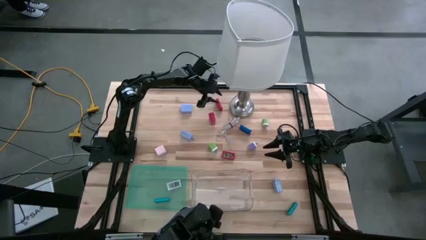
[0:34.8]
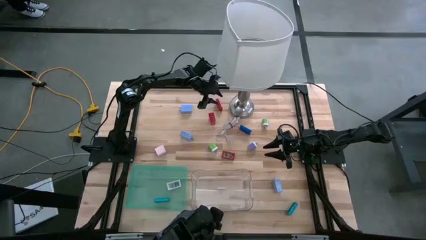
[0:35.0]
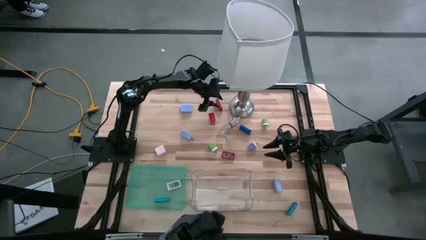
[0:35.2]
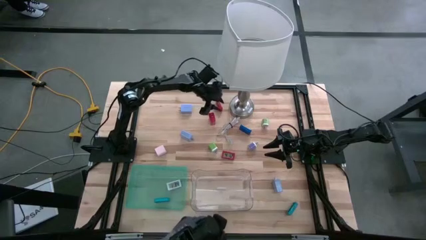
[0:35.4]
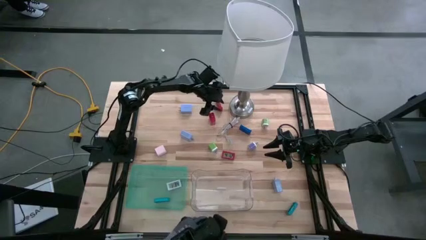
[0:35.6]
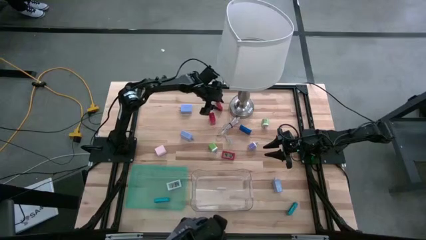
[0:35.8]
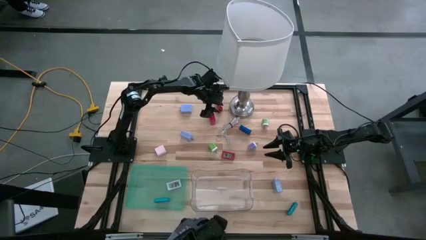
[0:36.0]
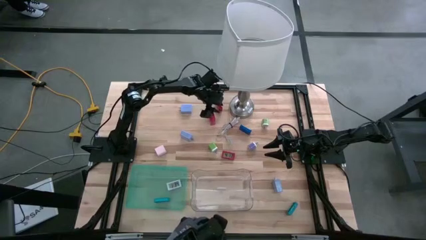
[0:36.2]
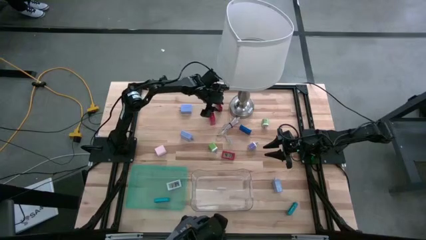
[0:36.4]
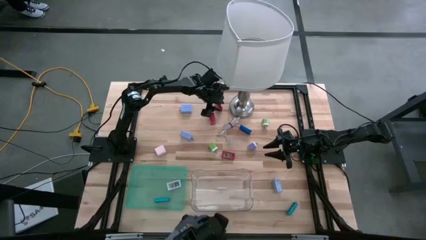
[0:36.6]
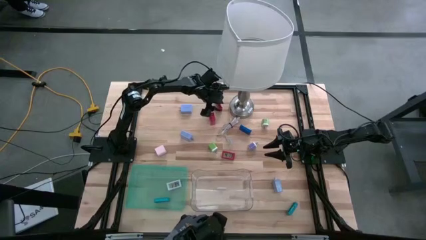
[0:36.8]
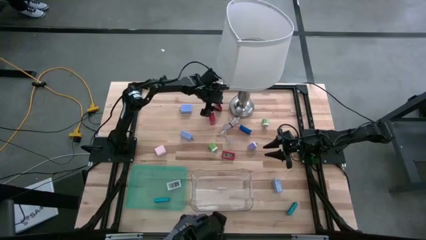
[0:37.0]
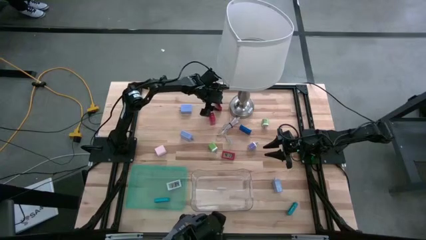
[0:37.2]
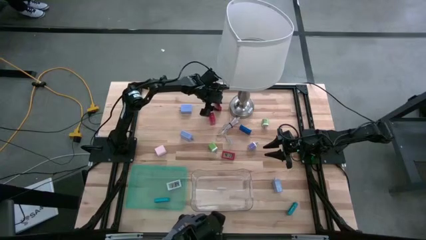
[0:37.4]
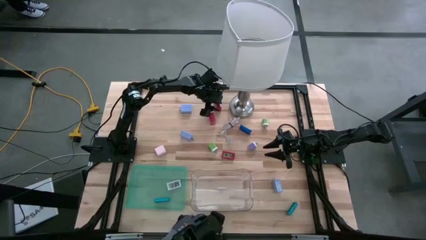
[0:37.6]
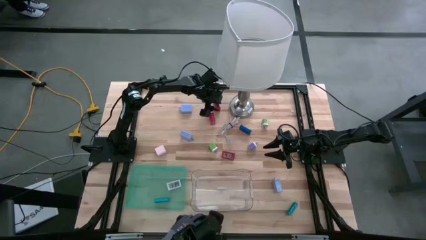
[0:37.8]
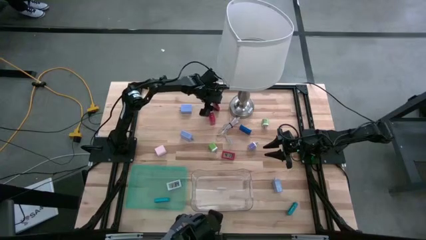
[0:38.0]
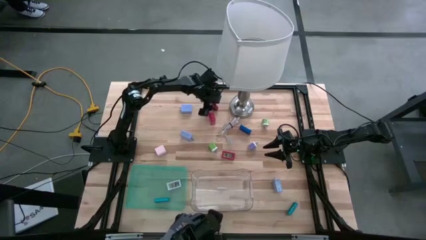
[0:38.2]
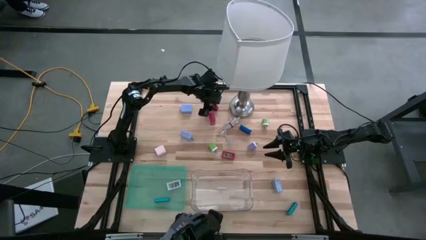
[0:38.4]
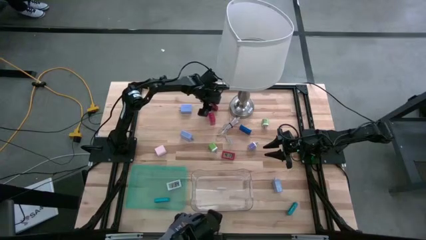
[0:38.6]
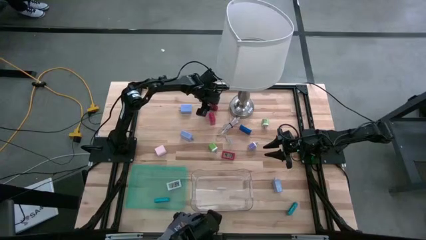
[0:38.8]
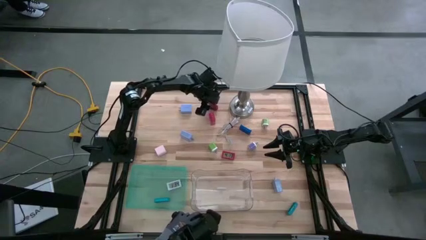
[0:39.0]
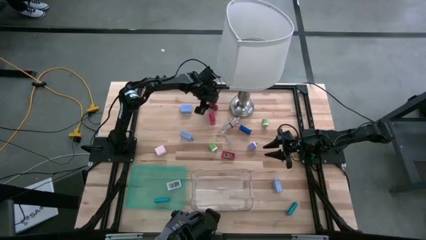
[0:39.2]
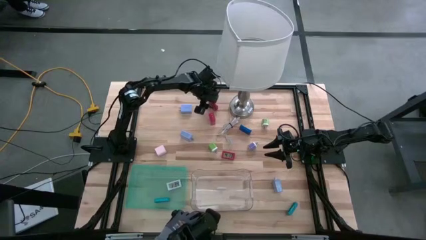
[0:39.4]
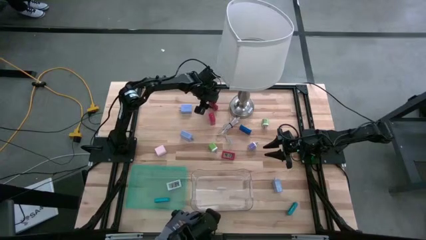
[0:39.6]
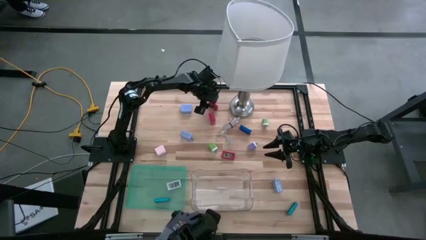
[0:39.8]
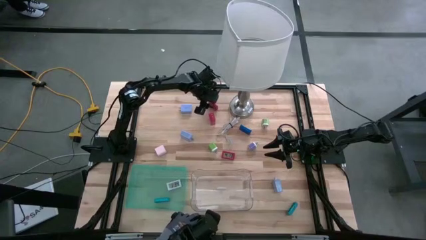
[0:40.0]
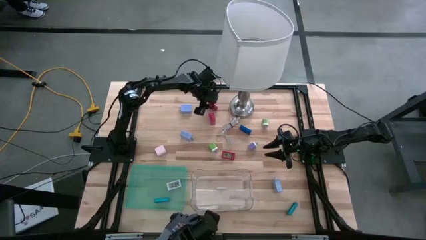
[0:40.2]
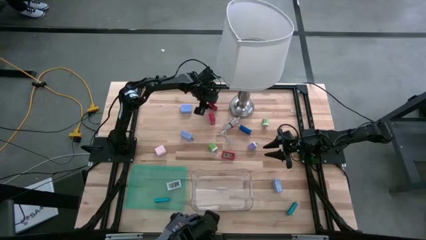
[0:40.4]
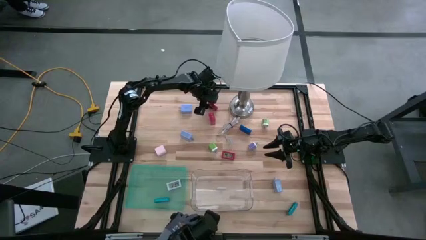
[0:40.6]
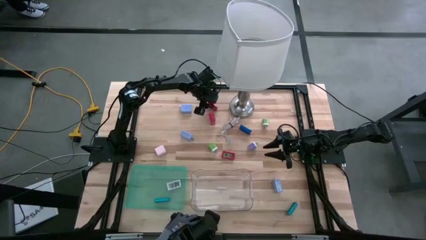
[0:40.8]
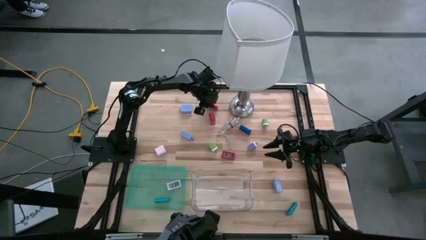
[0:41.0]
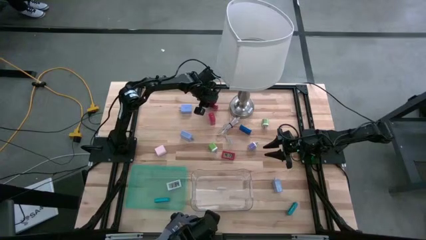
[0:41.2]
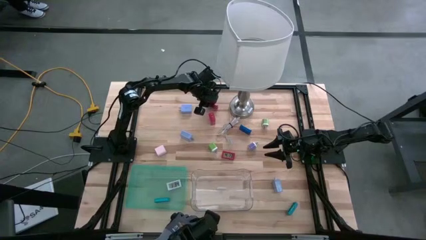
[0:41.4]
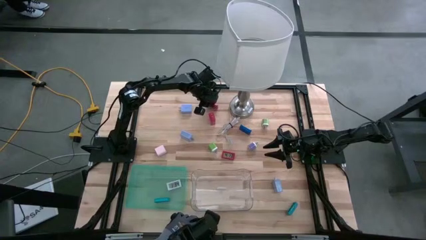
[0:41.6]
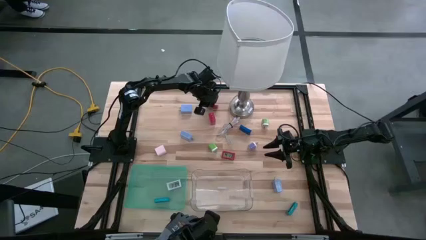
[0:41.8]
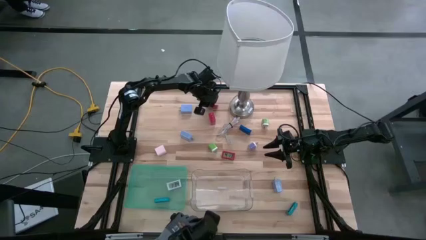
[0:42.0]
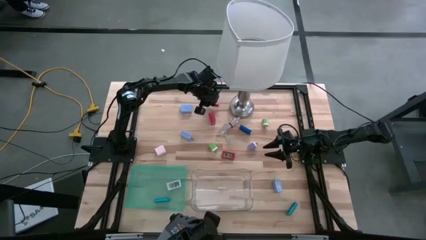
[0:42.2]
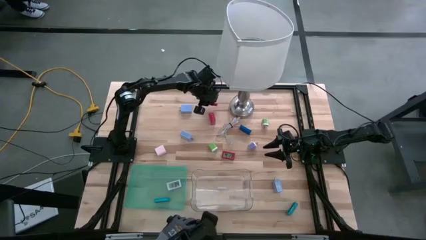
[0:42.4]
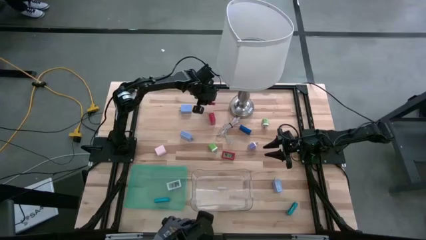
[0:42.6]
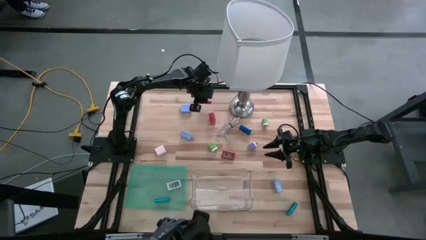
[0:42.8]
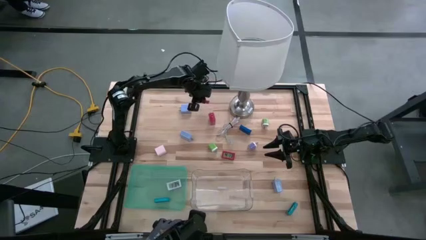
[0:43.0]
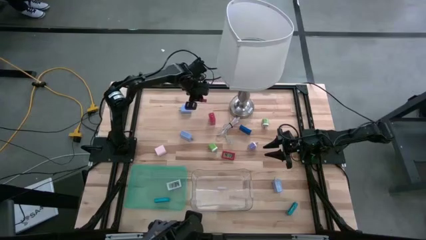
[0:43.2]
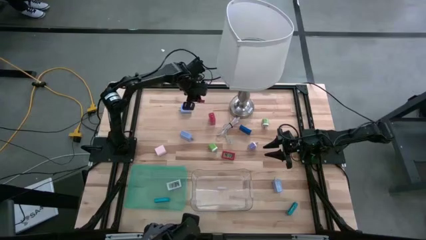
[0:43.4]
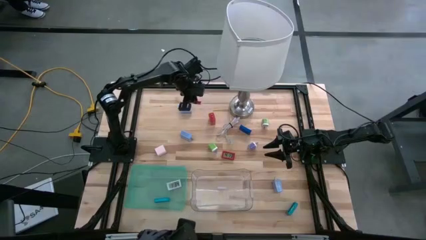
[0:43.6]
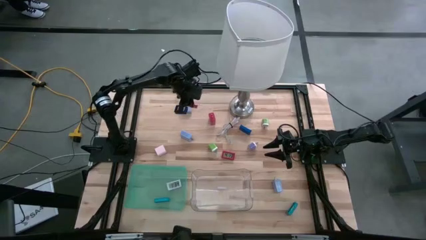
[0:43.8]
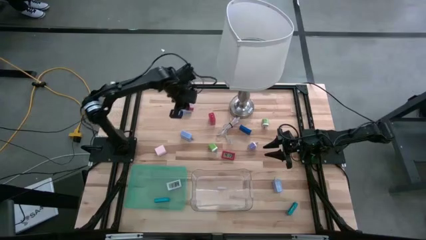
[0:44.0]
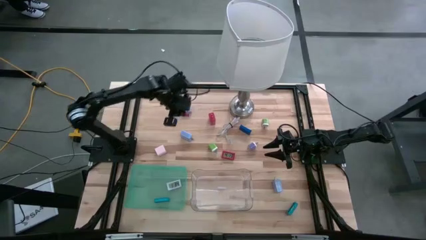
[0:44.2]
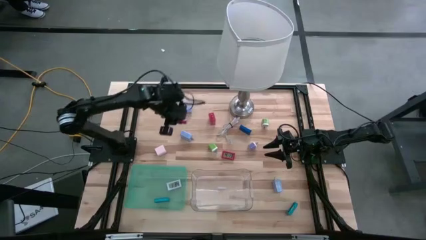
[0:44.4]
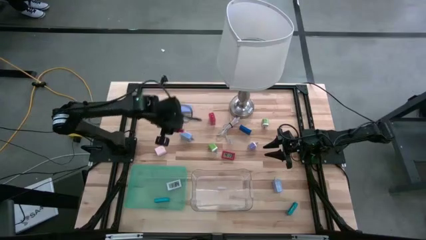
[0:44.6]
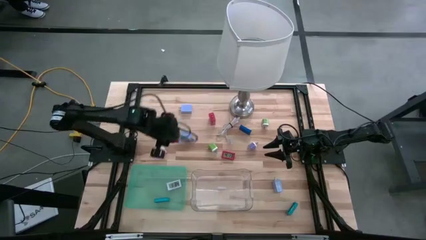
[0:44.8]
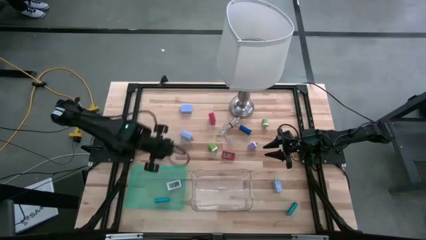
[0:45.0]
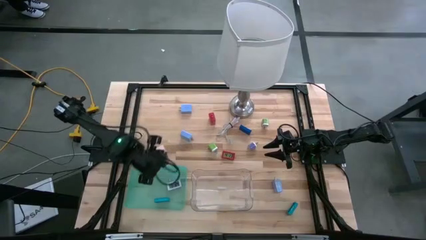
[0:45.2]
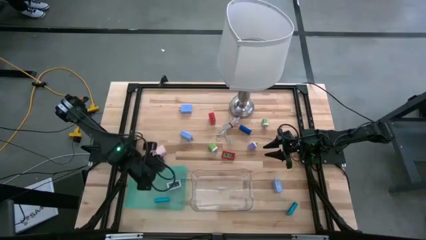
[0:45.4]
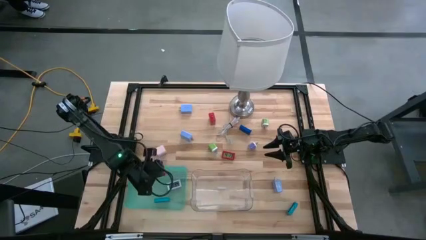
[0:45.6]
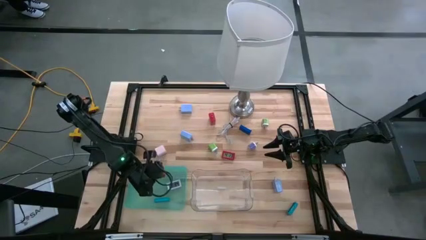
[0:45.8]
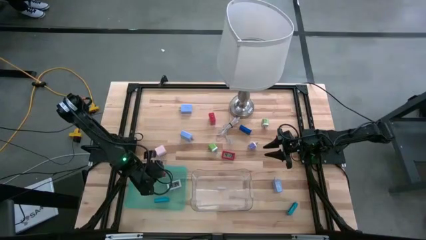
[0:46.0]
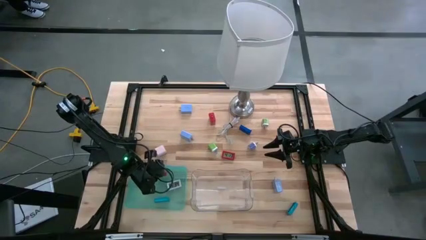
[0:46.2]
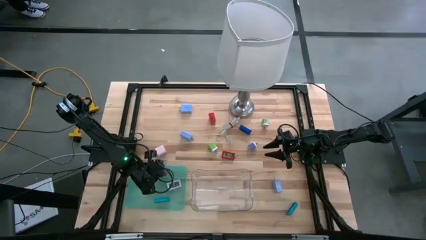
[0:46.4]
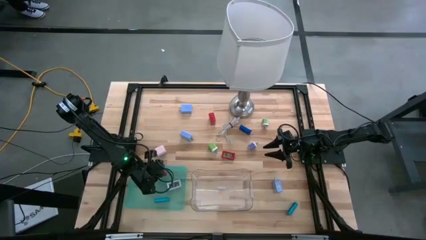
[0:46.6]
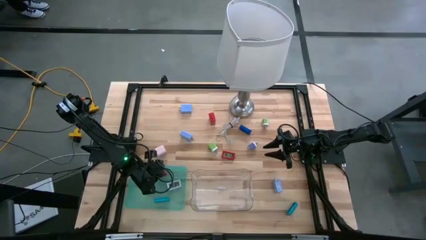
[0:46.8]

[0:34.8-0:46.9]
Task: Pick & Place Office items
Put the top red timer into the green bin

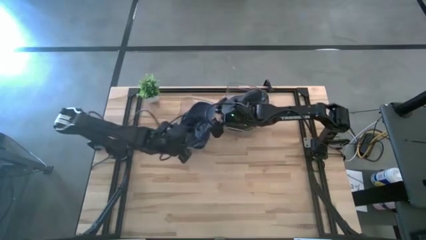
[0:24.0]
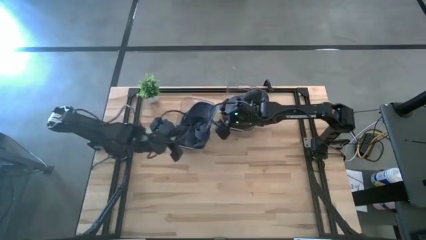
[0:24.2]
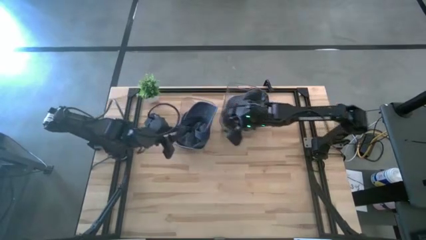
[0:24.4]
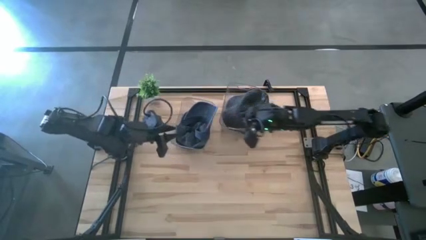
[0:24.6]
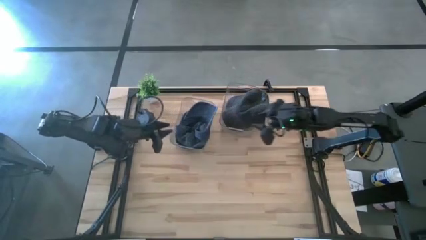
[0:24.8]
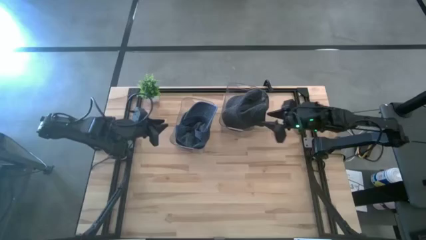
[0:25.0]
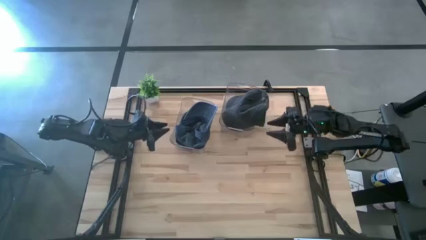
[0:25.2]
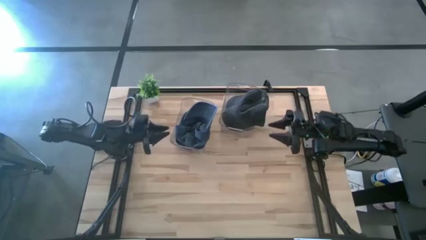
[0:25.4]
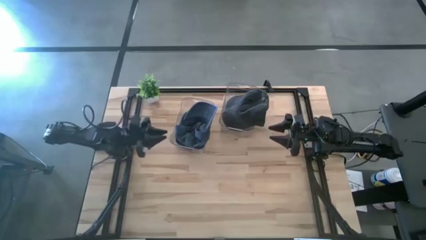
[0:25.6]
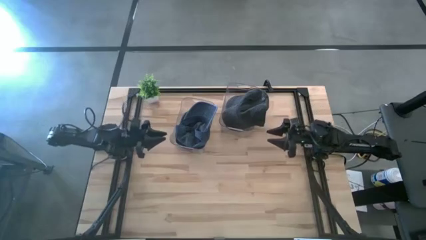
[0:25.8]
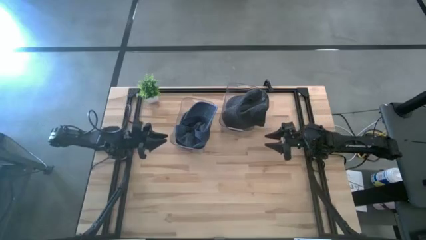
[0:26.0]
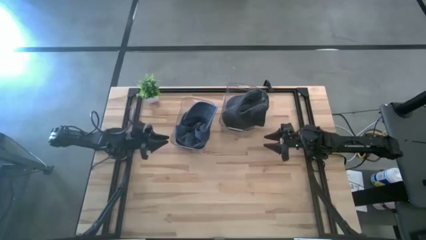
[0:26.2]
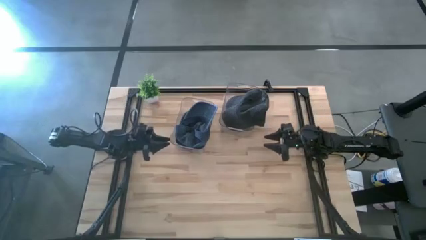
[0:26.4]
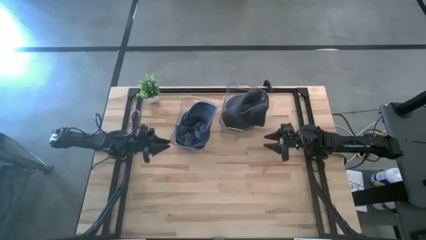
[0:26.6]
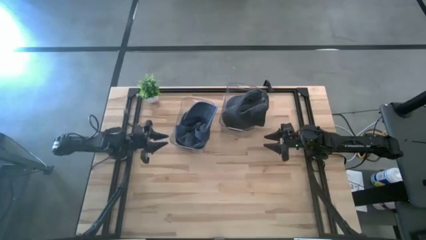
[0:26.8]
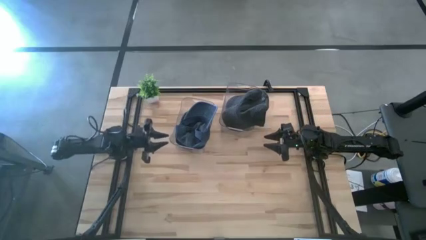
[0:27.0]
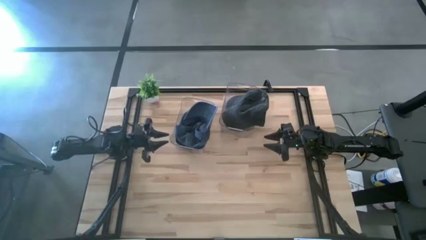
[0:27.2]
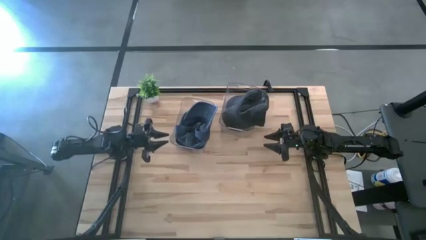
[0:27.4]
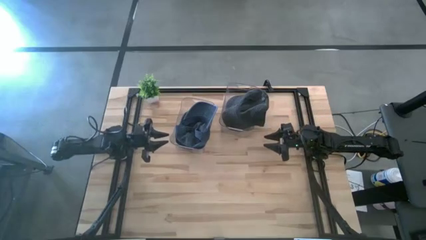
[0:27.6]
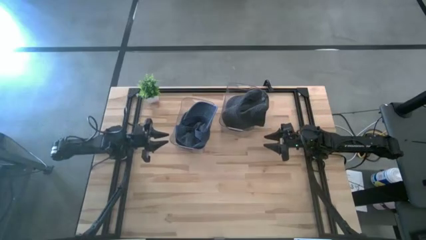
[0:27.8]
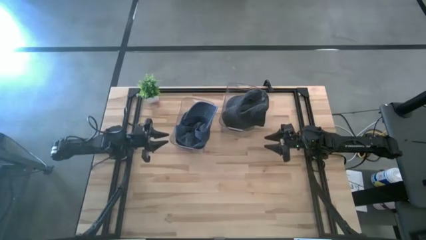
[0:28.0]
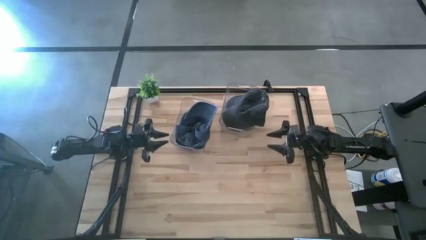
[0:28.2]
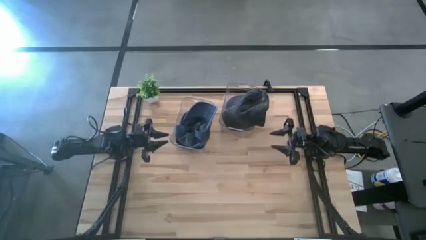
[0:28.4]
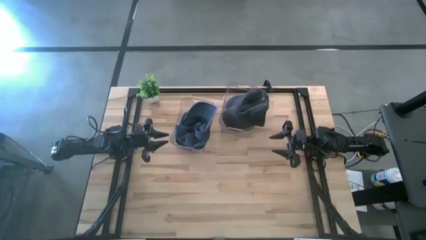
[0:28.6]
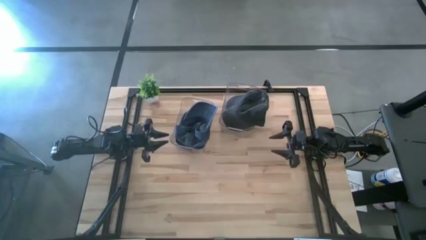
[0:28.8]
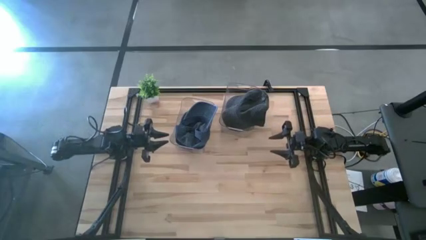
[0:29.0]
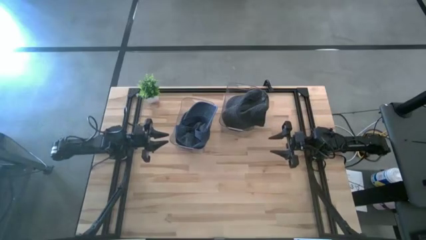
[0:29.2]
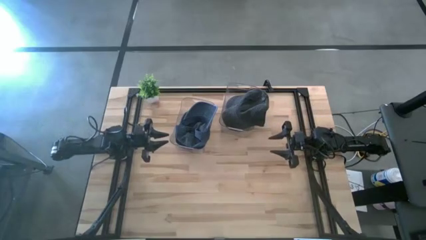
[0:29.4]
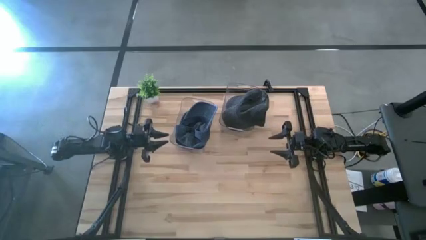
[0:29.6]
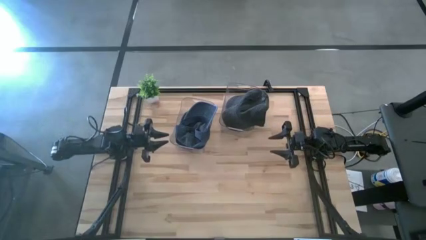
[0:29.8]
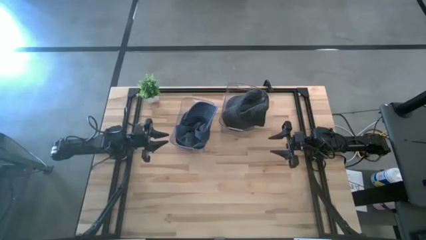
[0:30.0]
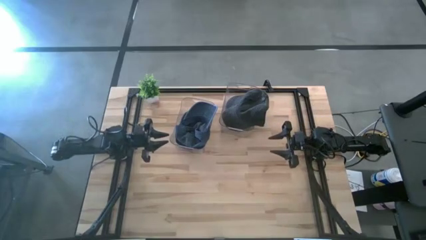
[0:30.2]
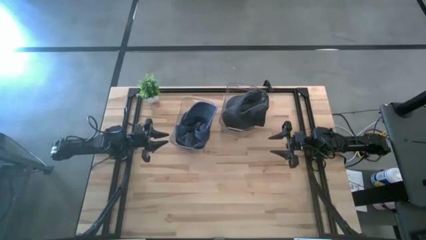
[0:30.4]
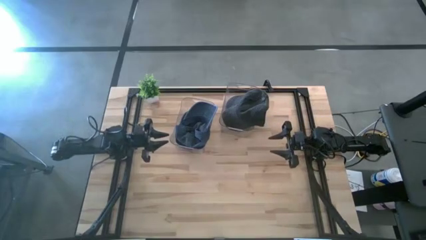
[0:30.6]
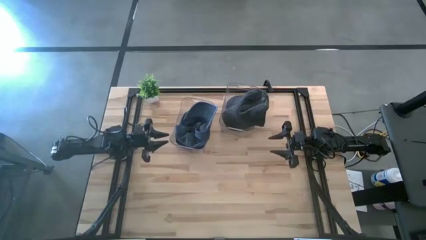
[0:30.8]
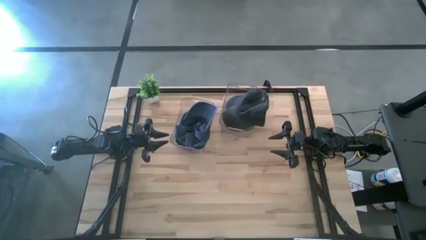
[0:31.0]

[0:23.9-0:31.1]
Task: Pick & Place hat
Return to Home Position
